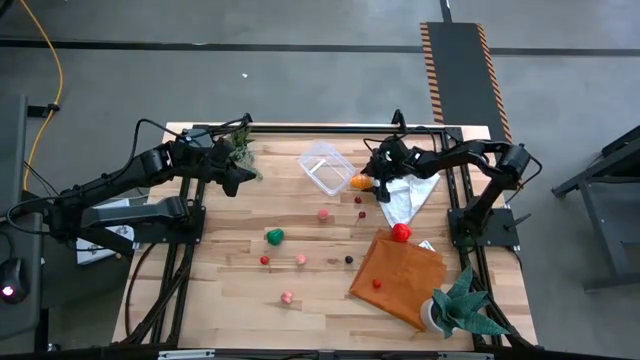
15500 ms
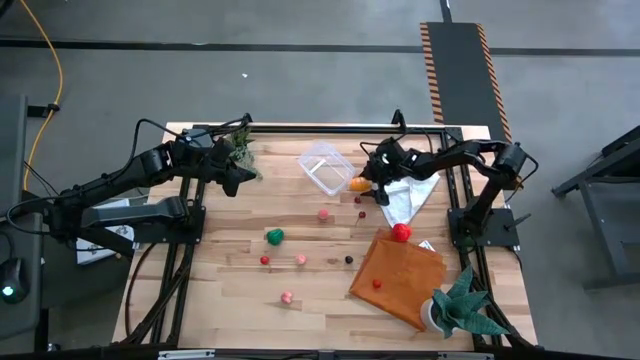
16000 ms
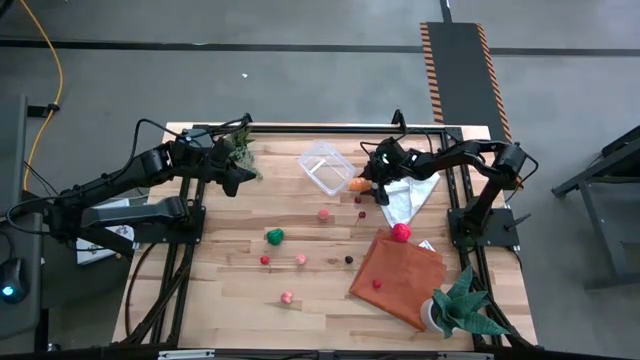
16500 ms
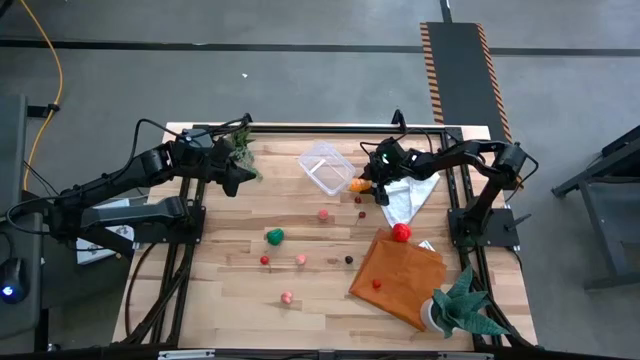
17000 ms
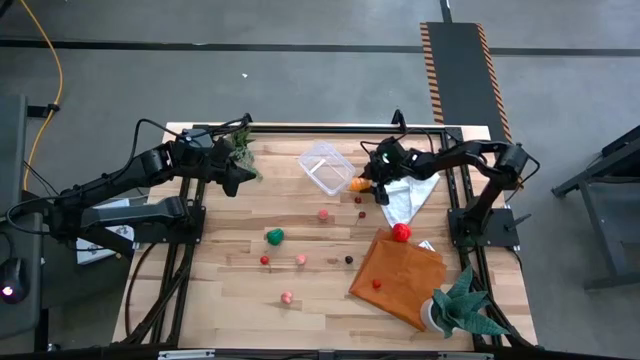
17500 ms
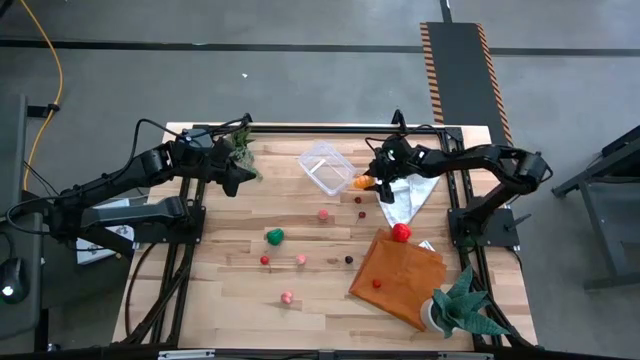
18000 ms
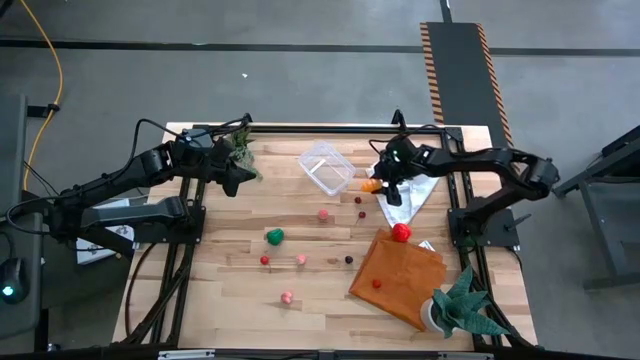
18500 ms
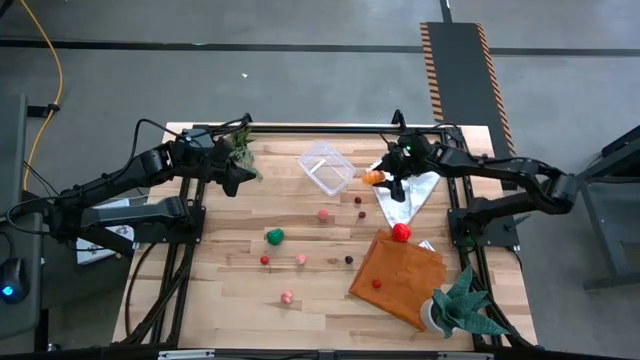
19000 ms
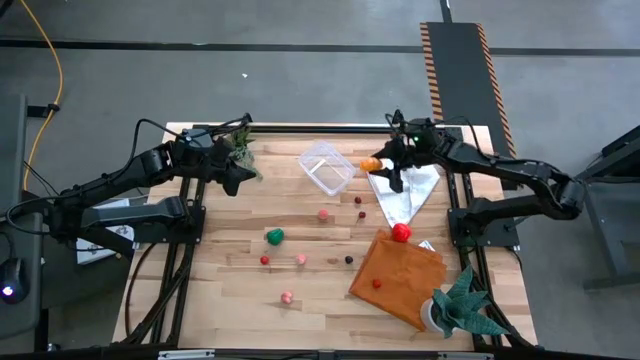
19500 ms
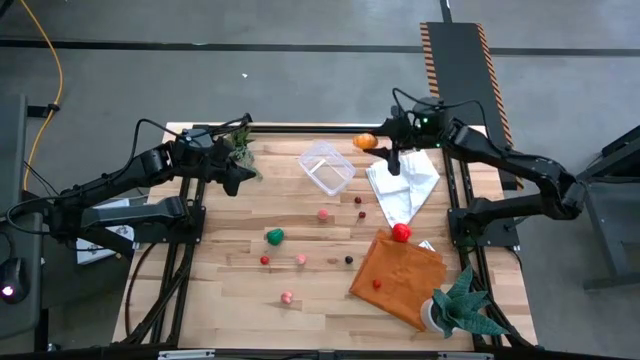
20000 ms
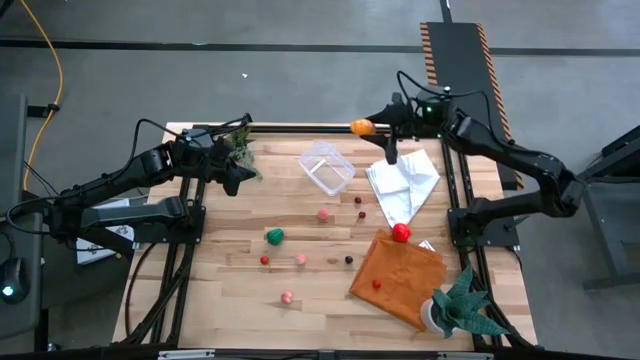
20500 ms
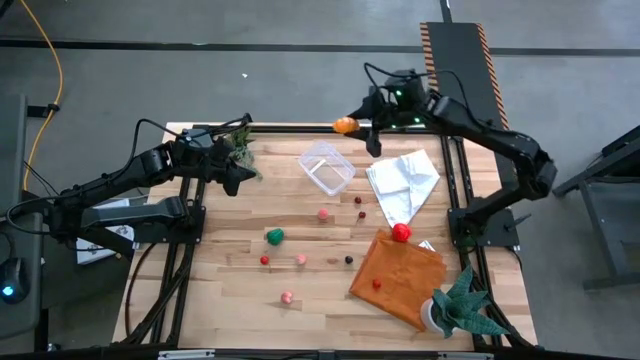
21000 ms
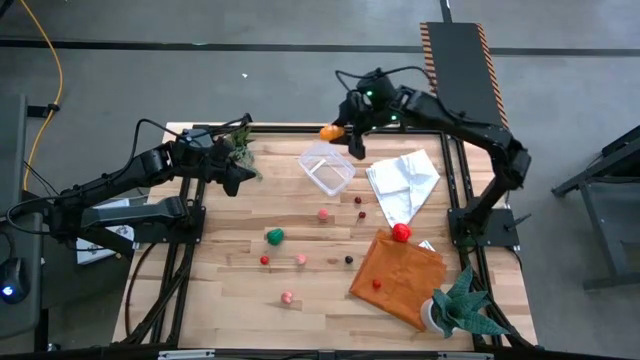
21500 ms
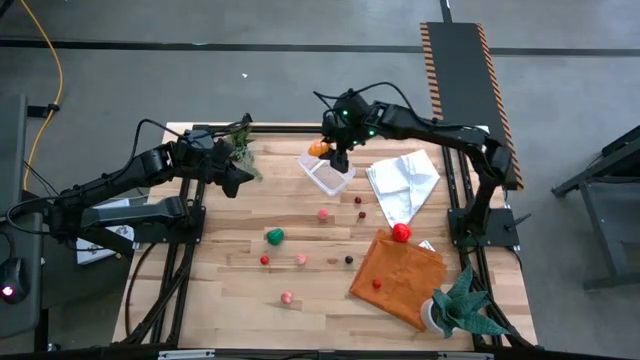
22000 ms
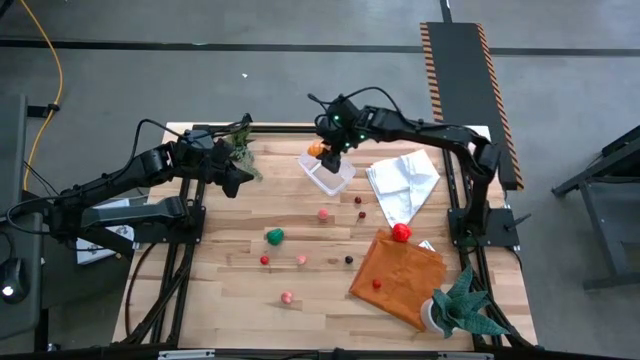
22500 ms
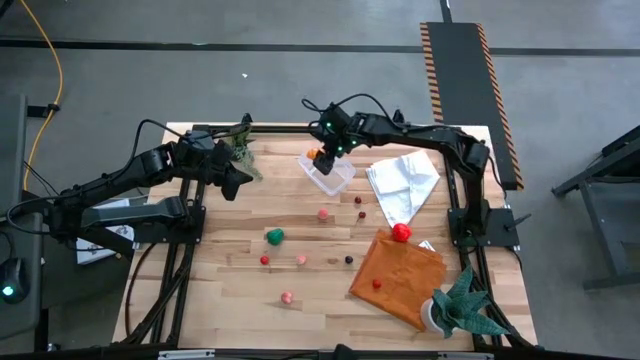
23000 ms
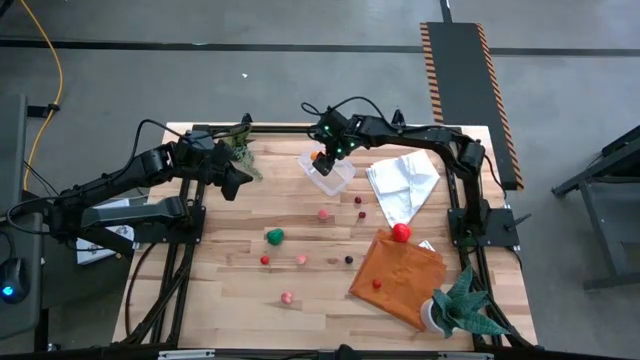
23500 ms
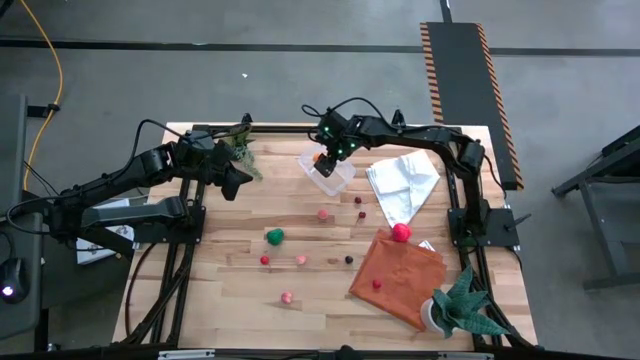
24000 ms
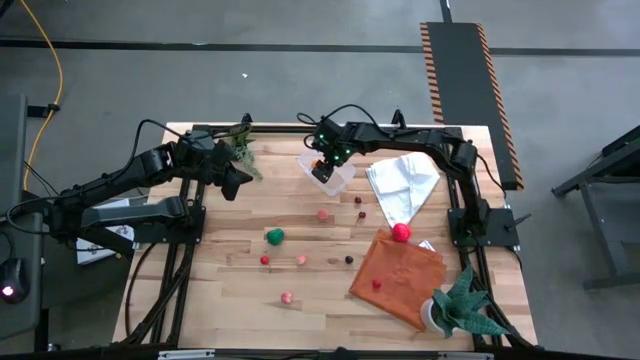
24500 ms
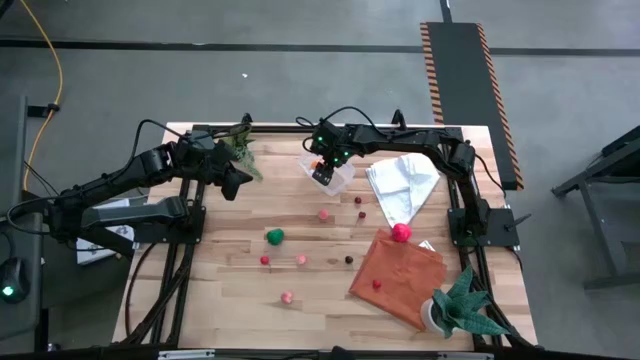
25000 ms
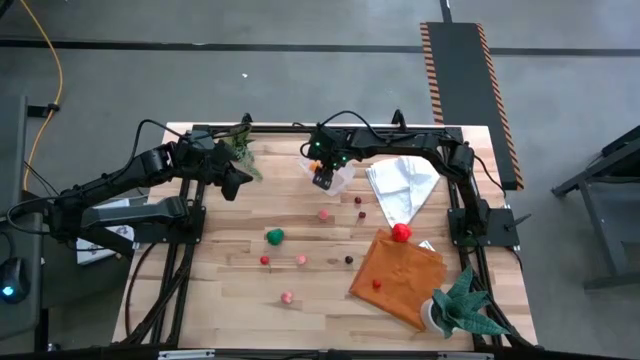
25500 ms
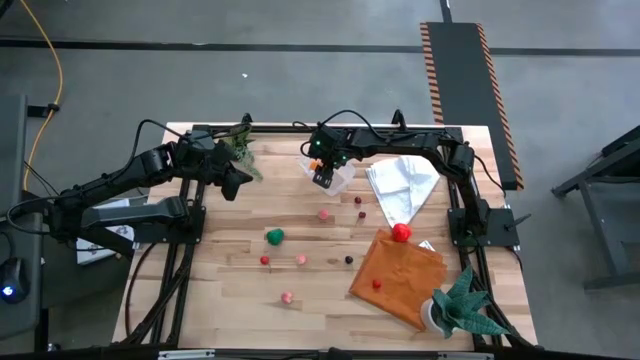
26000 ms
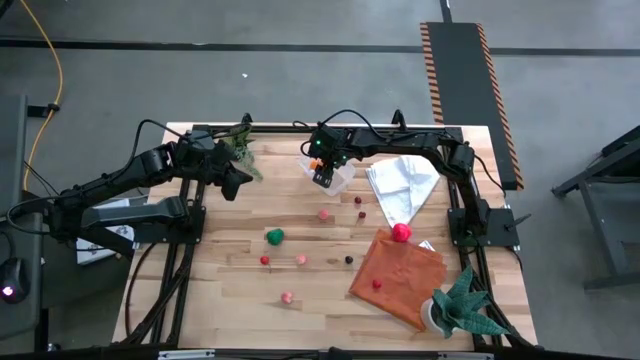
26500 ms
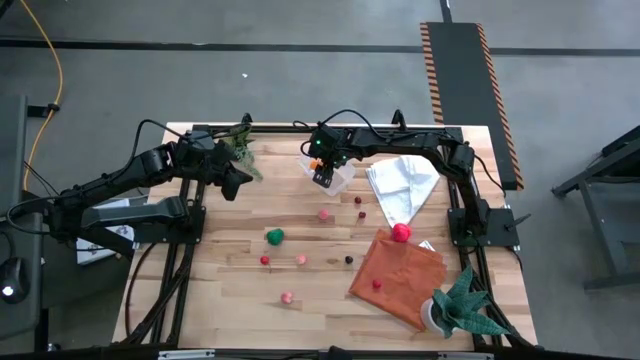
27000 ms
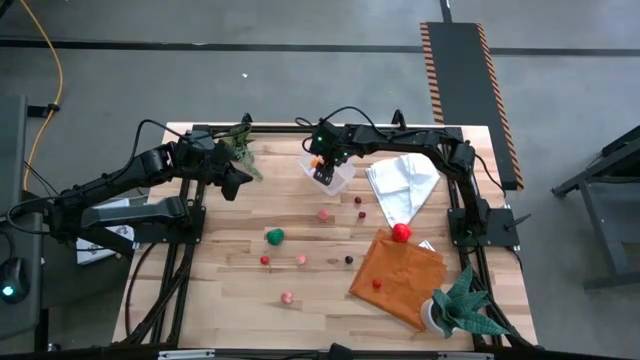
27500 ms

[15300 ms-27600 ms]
Task: Pick and placing Produce into tupperware
Put the brown croissant into the transparent bin

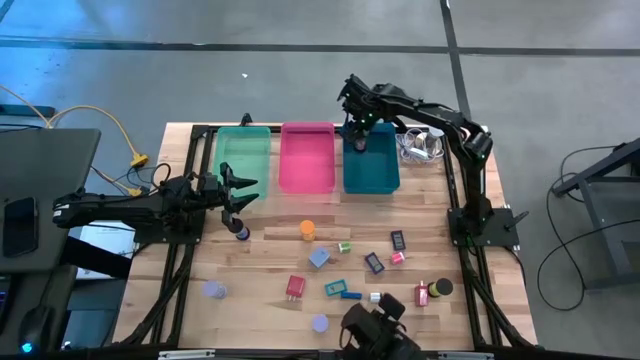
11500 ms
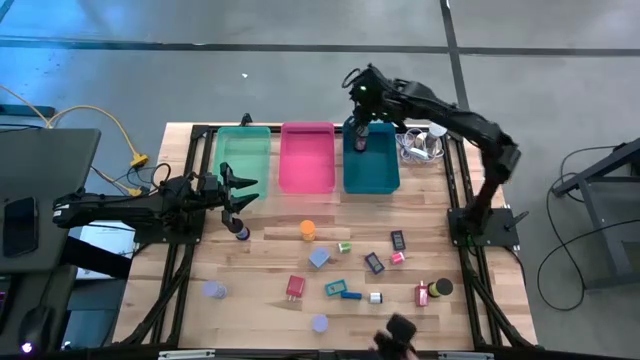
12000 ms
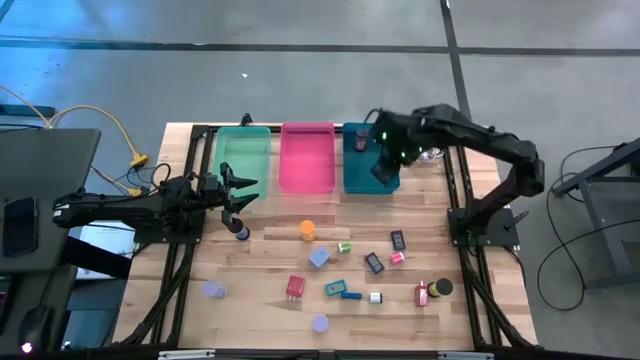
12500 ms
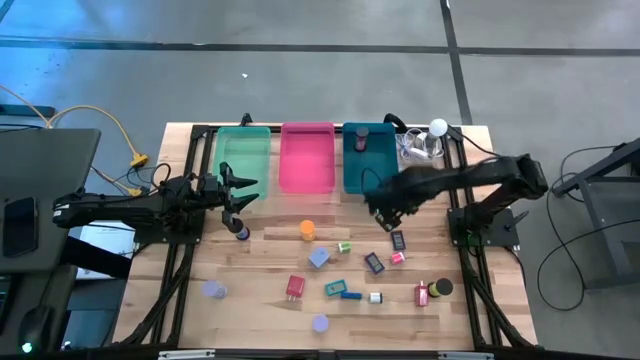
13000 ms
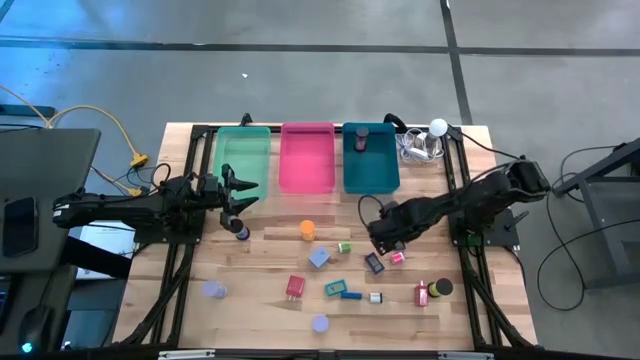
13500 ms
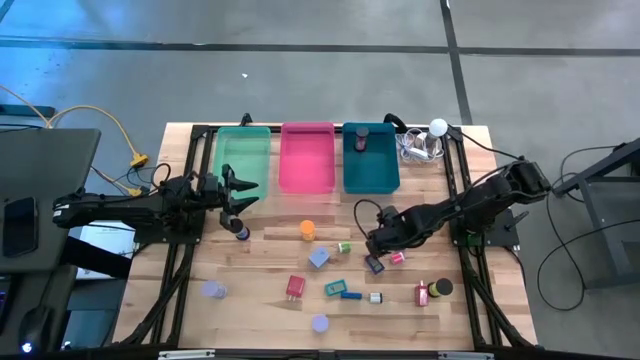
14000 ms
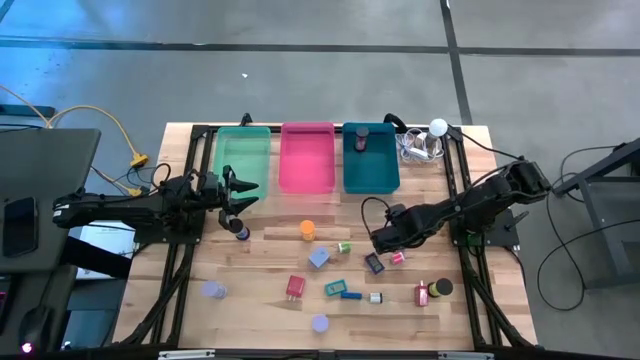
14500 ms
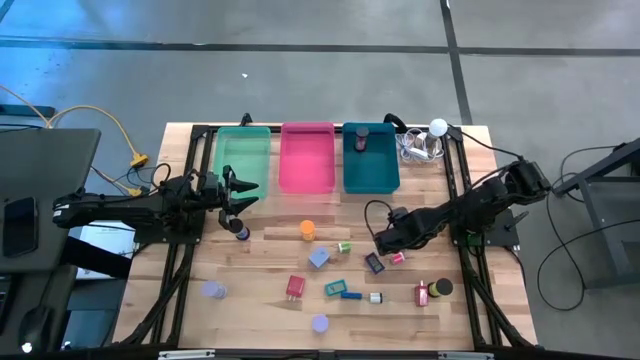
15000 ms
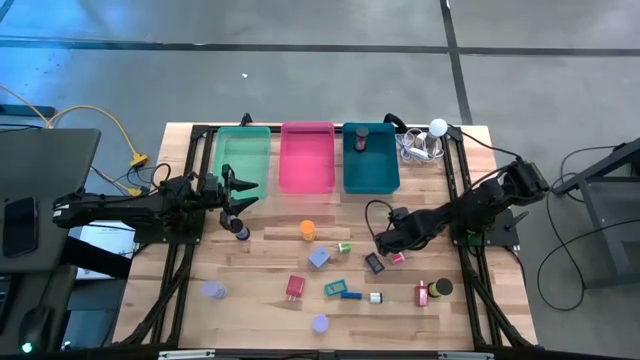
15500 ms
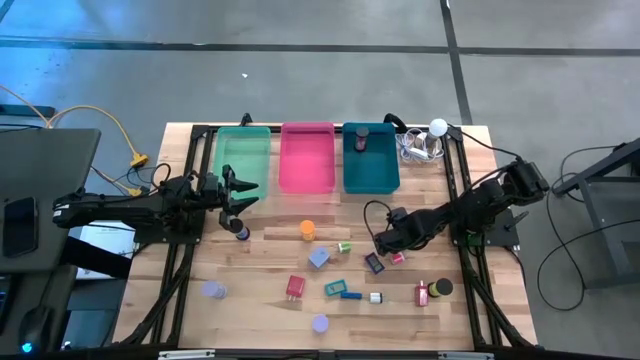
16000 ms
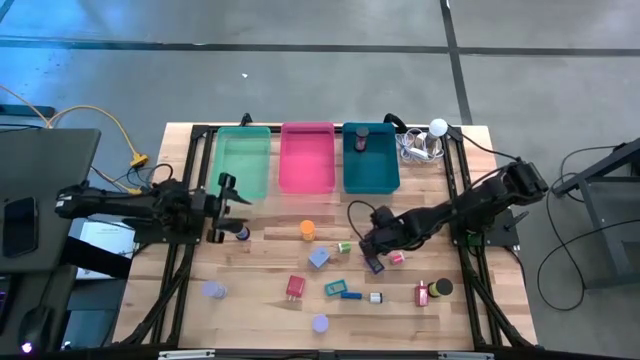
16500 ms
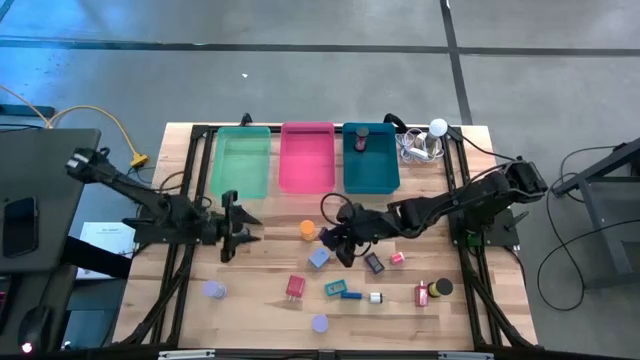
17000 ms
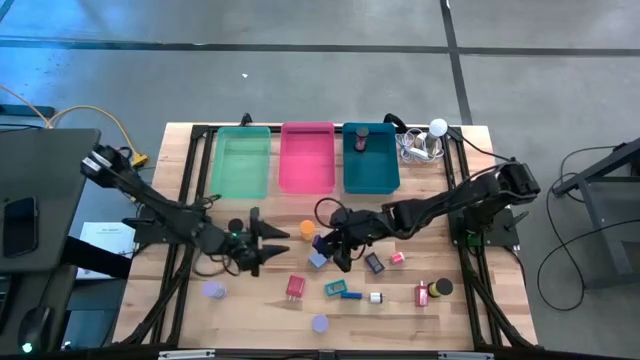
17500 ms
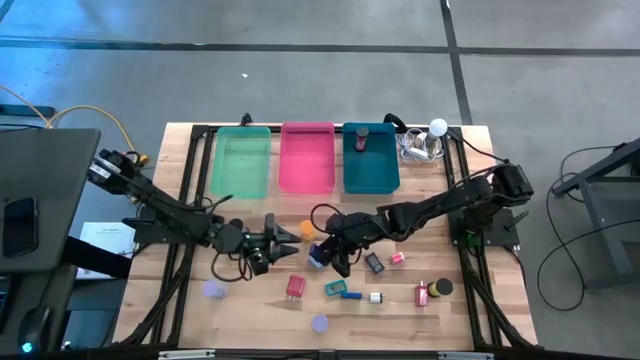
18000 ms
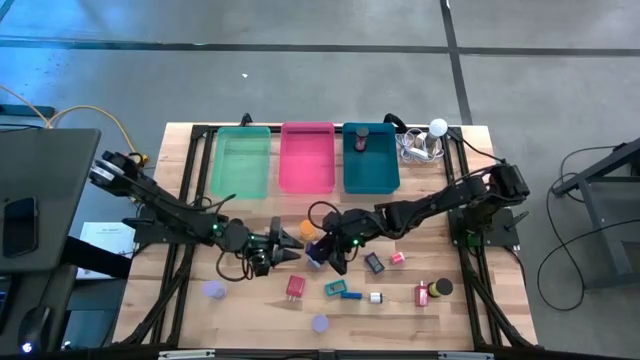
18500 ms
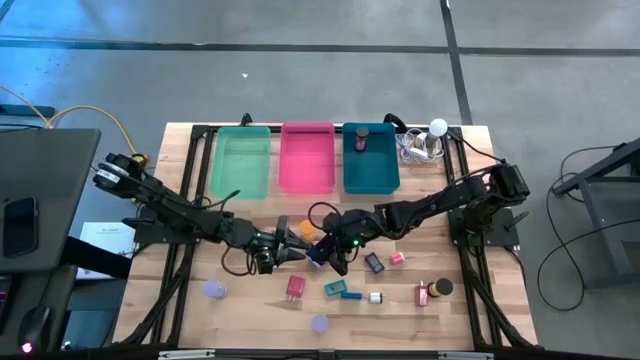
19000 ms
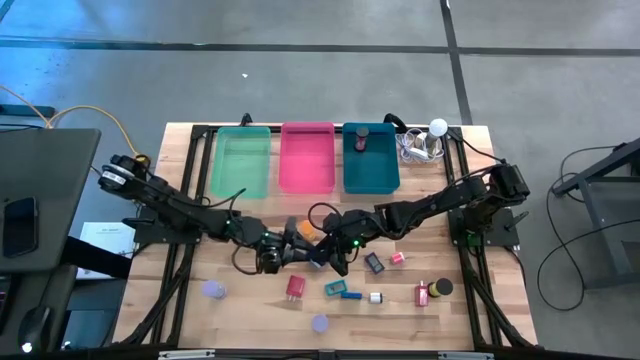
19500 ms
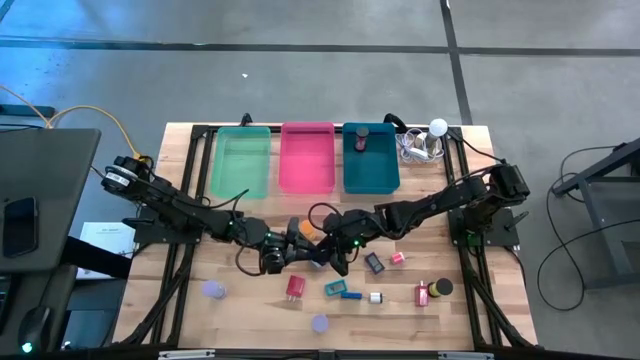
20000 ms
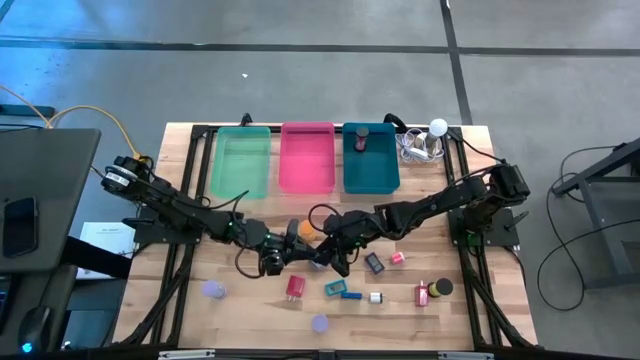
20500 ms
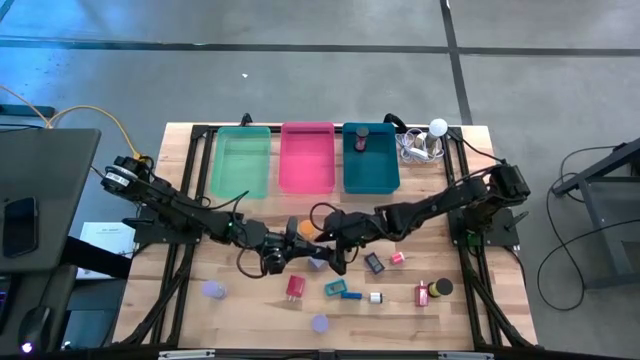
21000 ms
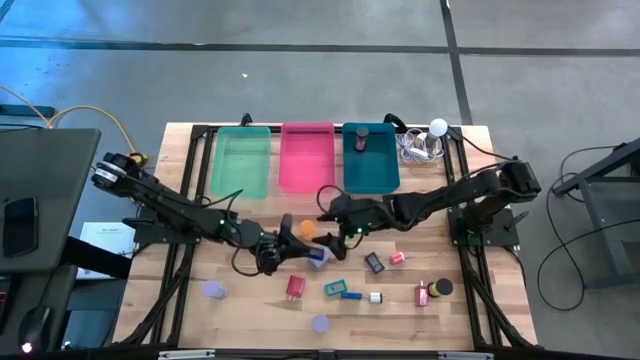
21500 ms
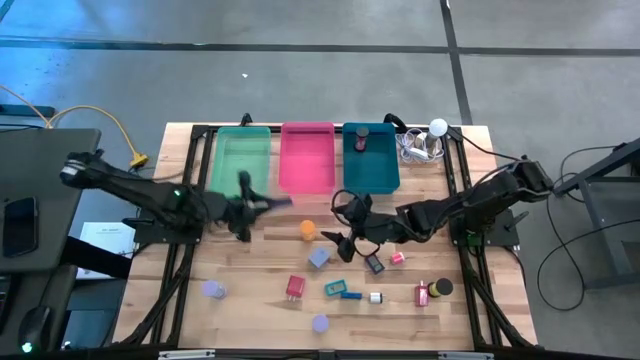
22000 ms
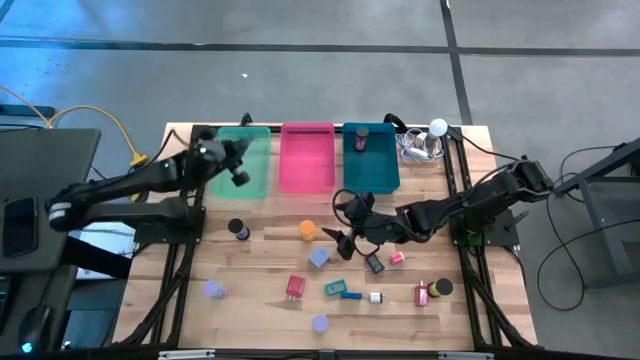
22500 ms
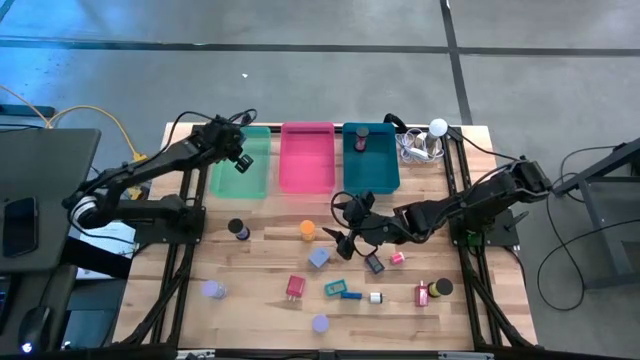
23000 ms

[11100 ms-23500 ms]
Task: Pick & Place Office items
Put the top dark blue digital timer into the green bin
